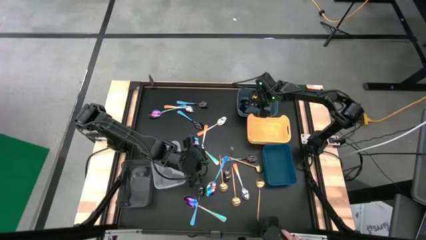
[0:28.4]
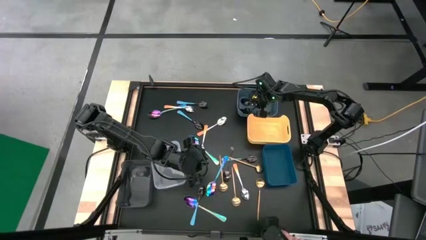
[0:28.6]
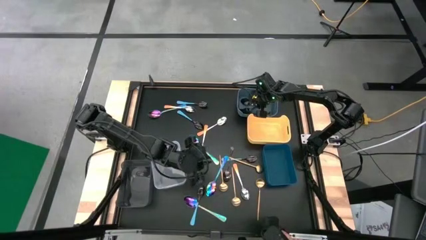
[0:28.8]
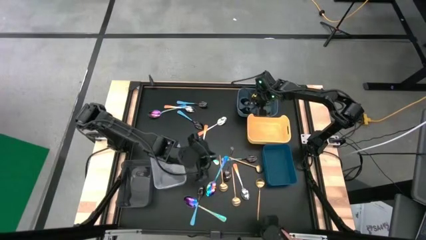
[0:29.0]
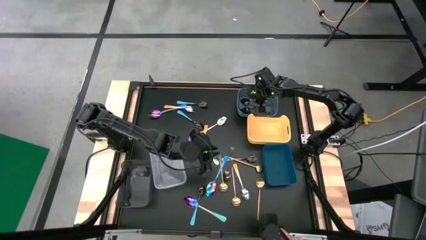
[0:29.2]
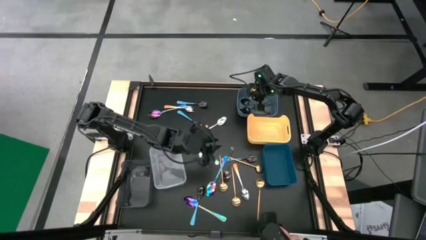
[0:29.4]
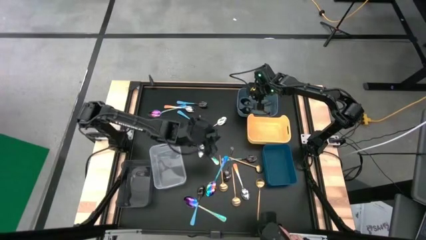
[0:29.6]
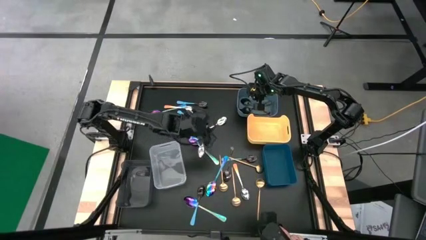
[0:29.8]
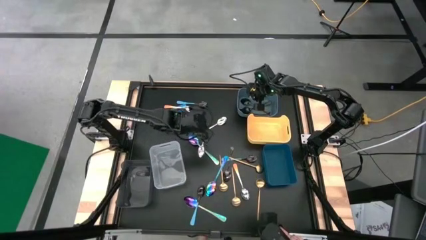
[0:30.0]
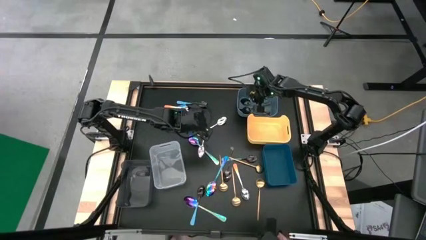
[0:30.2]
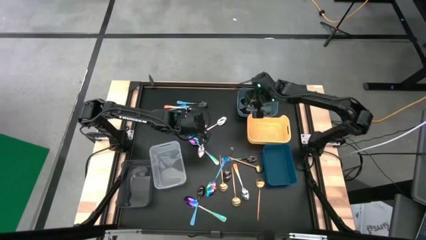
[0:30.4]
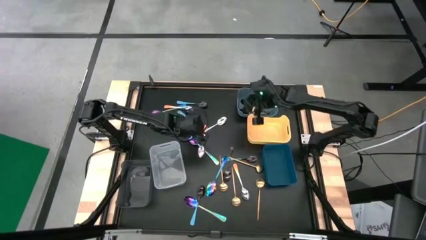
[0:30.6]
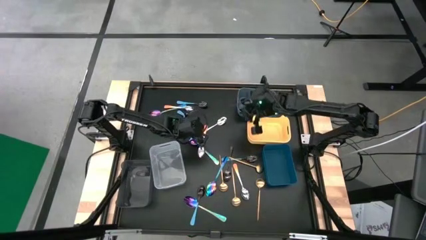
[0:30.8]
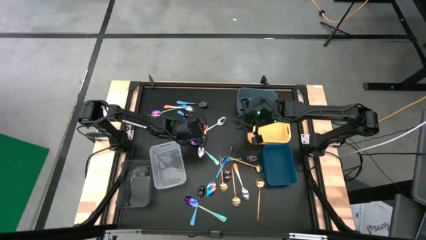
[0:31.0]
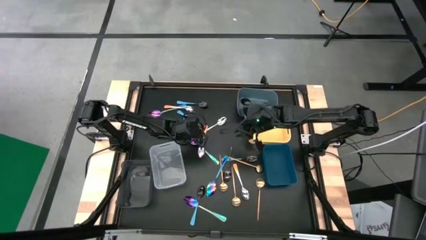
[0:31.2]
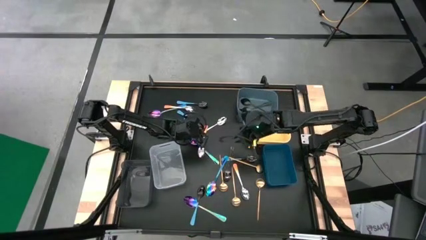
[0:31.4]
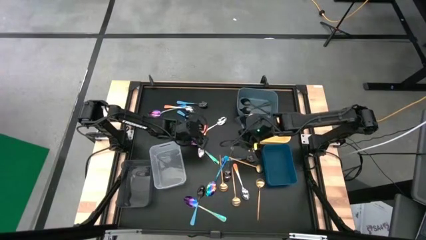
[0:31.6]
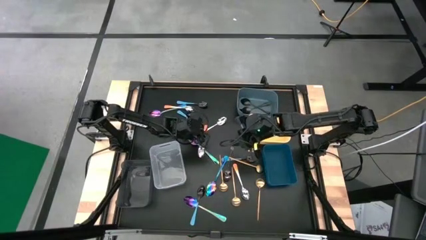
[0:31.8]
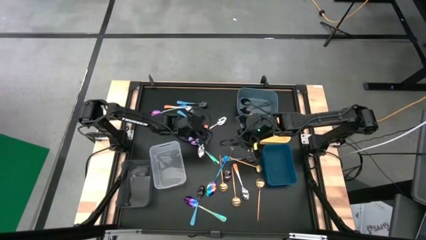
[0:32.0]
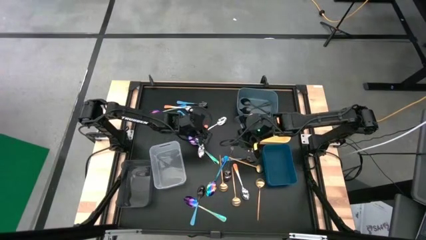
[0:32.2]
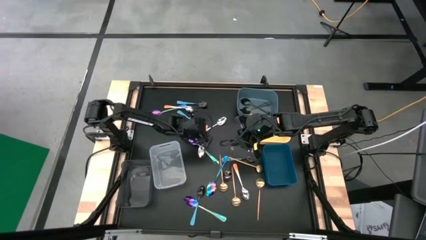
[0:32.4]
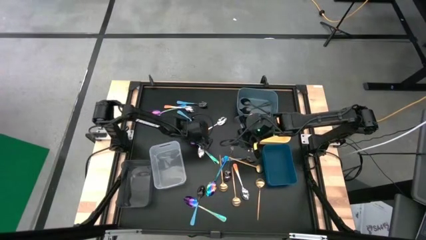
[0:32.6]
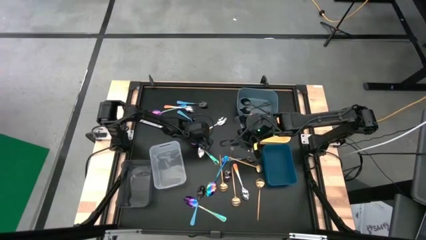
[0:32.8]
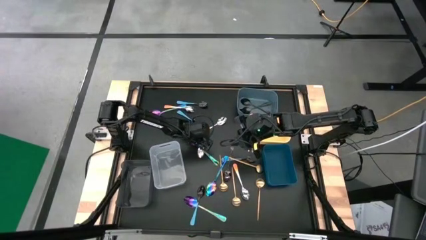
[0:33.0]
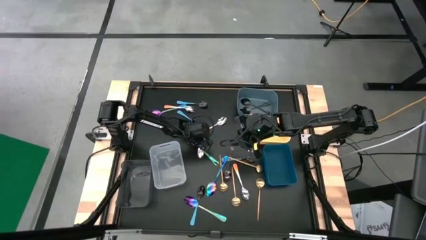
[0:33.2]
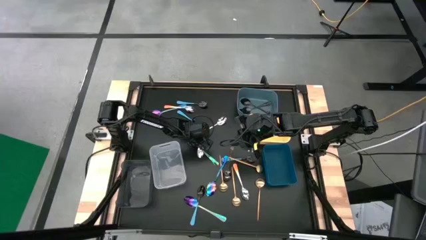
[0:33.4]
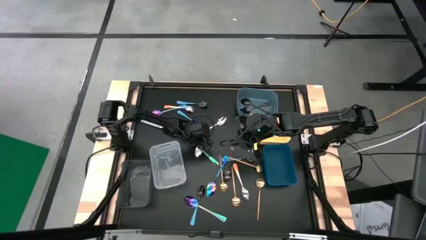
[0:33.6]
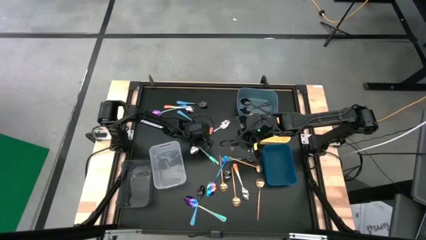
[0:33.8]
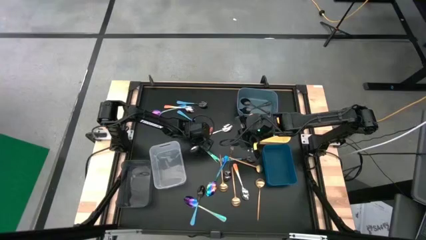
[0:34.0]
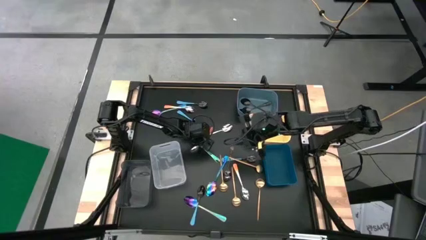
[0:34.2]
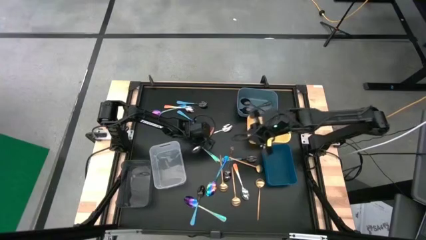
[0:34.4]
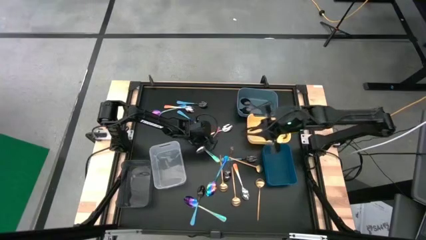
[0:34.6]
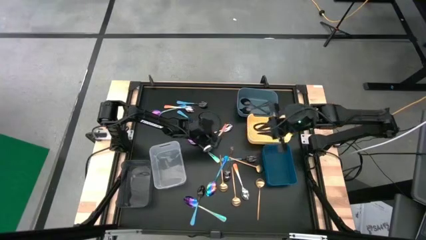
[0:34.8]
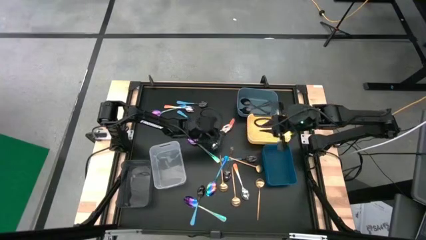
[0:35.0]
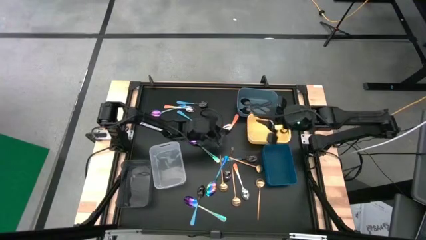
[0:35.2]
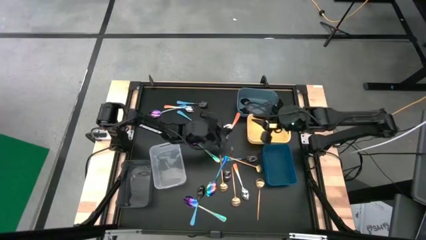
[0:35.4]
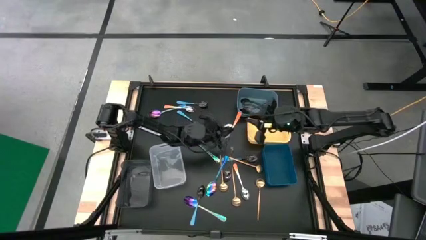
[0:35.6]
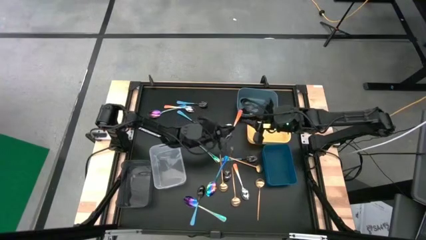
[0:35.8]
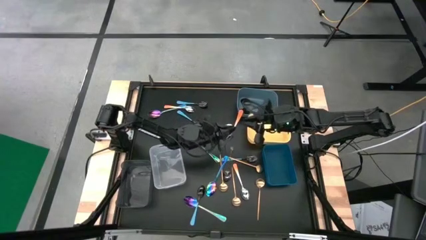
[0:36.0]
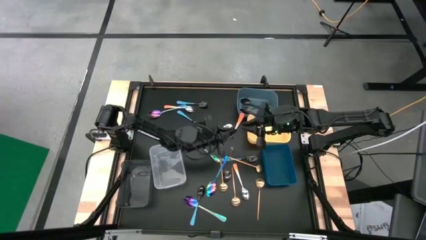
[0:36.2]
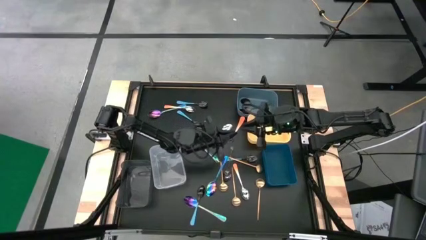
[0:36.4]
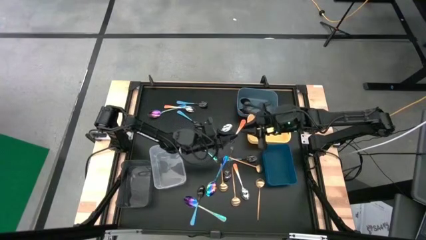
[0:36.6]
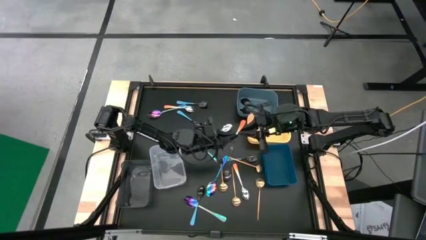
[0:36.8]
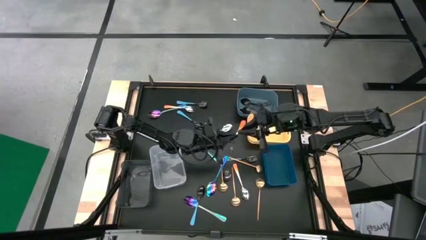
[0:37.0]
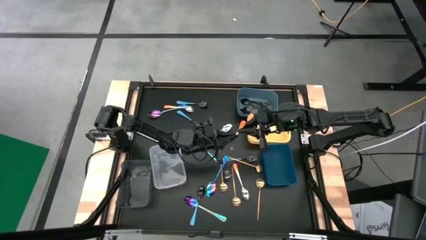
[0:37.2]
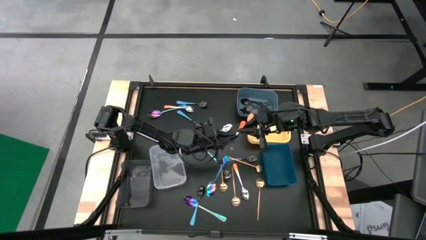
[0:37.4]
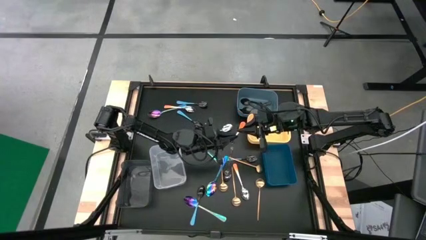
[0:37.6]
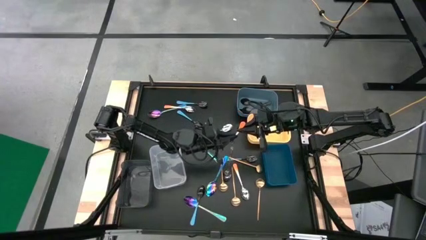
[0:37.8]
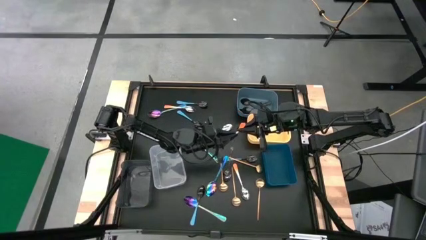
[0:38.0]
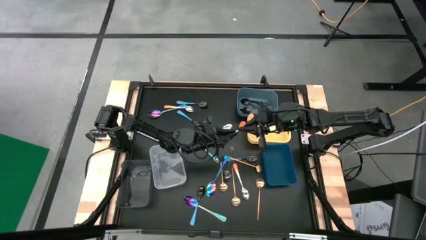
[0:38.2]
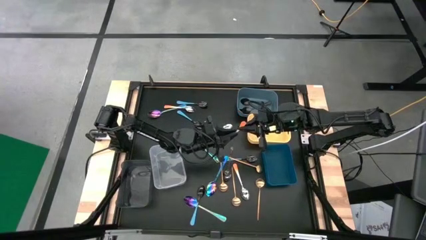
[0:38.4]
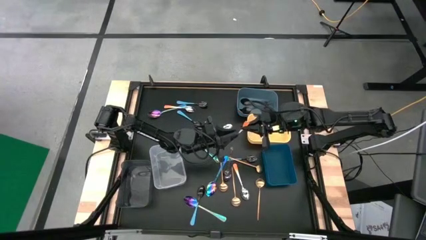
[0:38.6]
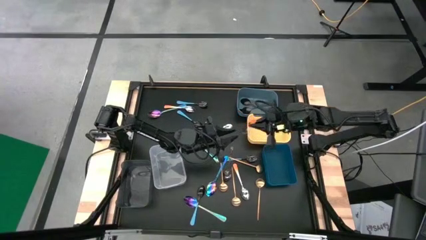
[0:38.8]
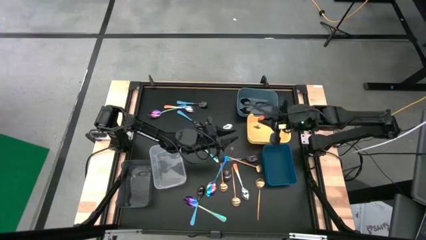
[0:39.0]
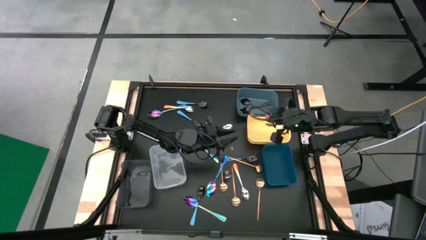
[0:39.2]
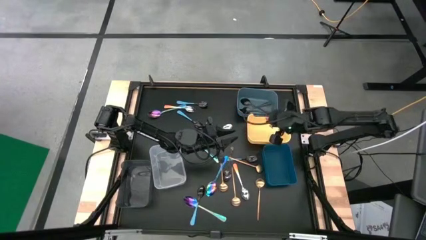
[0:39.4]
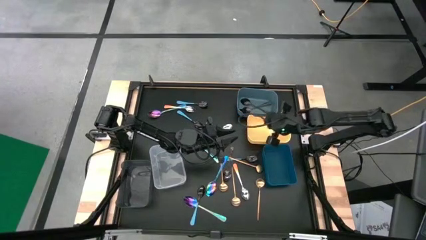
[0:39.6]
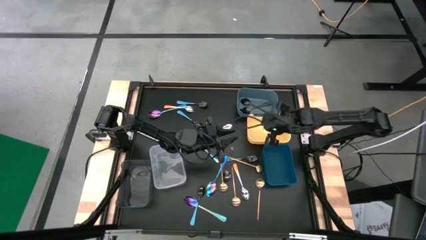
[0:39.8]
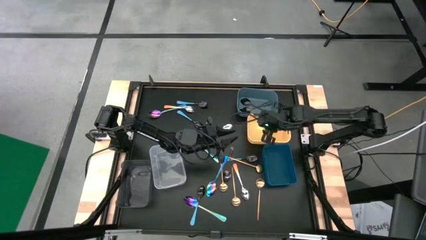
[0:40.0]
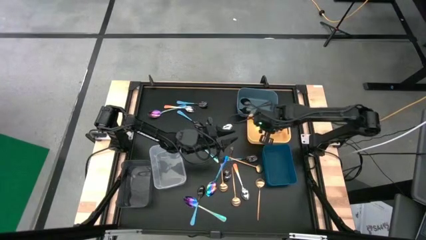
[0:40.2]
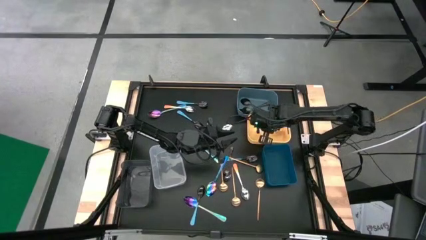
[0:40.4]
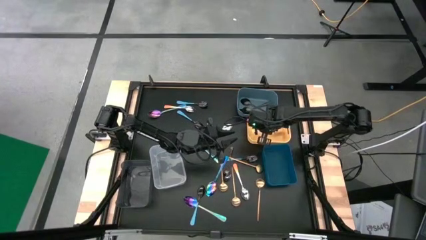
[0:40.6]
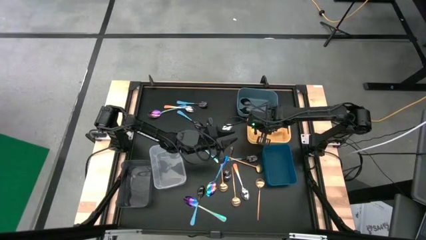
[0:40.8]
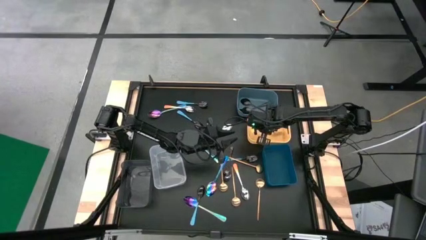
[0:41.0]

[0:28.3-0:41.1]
Task: Sort silverware by color (type)
Put the orange spoon into the yellow bin
